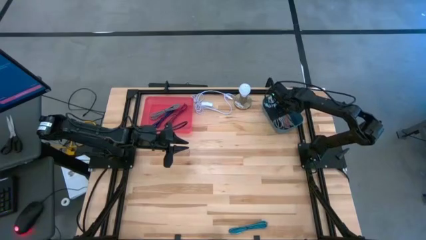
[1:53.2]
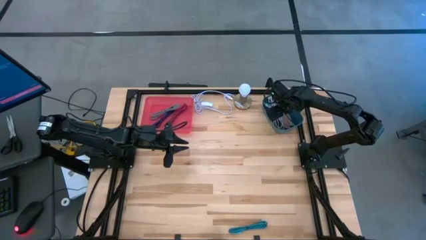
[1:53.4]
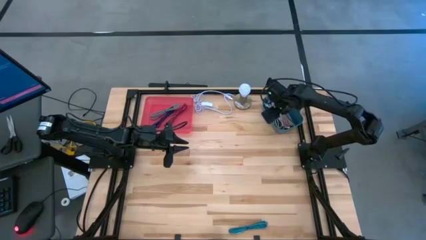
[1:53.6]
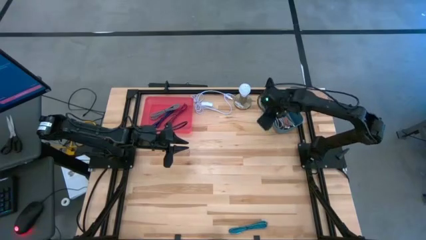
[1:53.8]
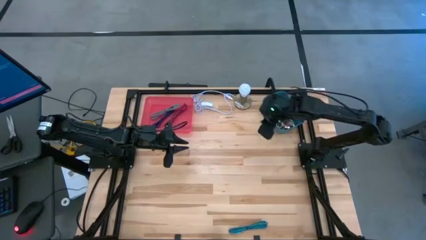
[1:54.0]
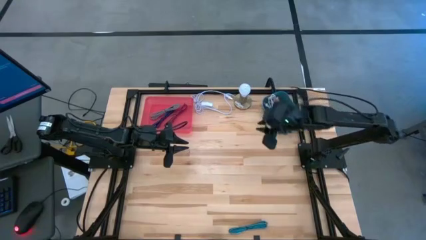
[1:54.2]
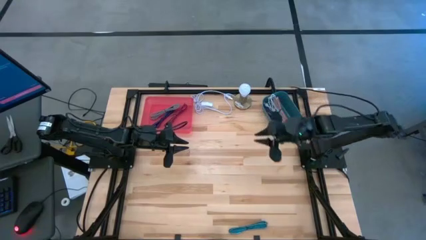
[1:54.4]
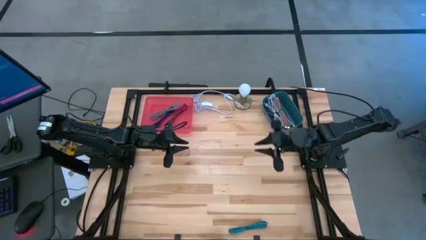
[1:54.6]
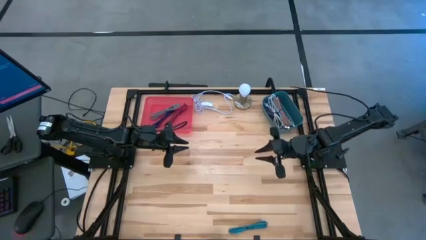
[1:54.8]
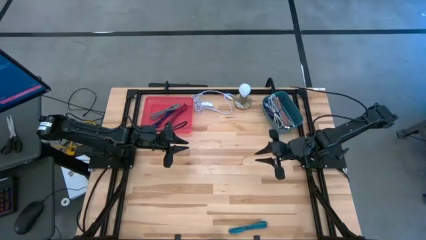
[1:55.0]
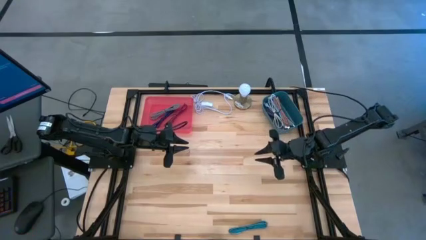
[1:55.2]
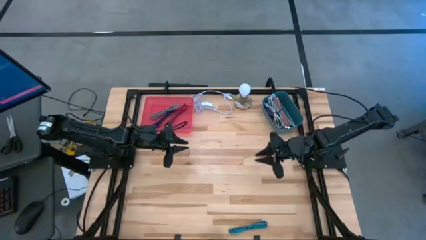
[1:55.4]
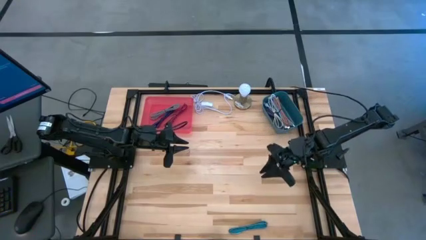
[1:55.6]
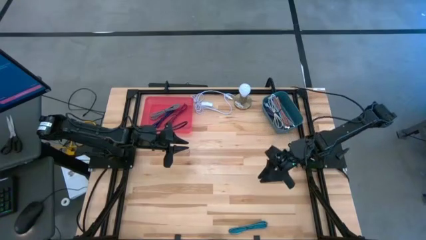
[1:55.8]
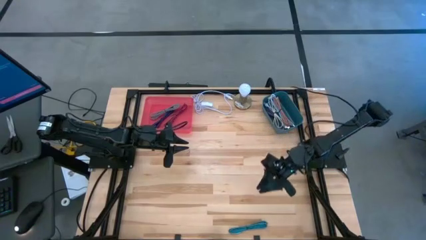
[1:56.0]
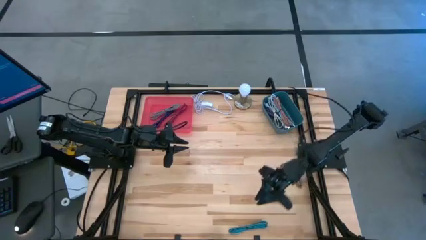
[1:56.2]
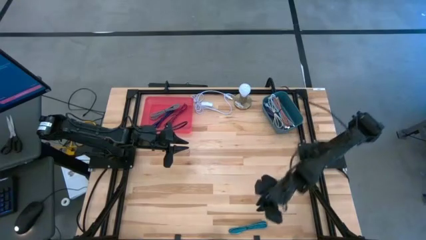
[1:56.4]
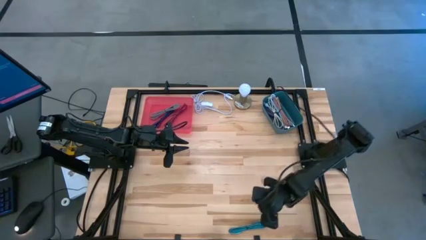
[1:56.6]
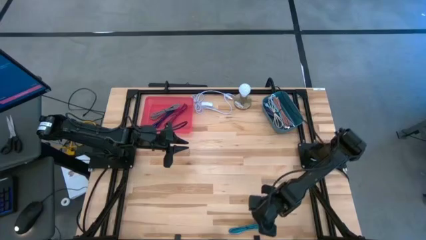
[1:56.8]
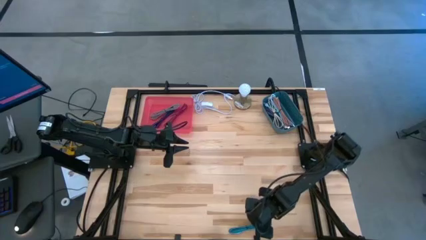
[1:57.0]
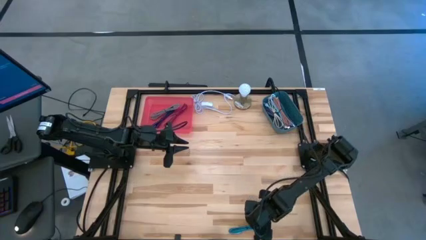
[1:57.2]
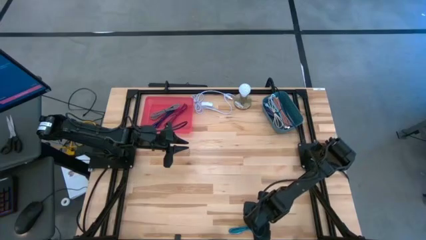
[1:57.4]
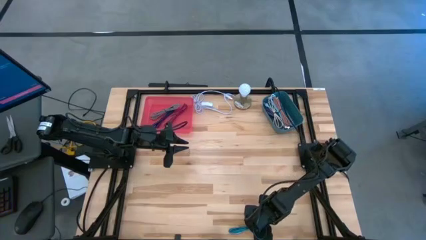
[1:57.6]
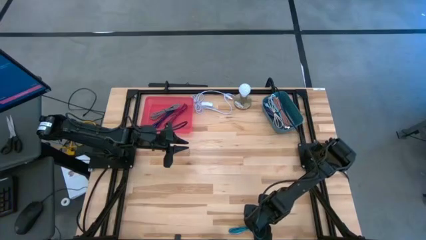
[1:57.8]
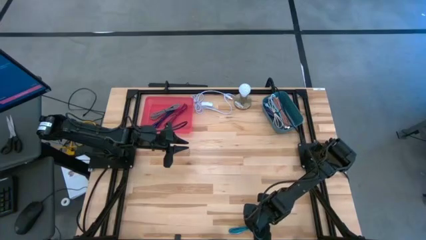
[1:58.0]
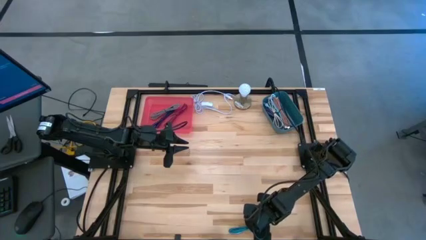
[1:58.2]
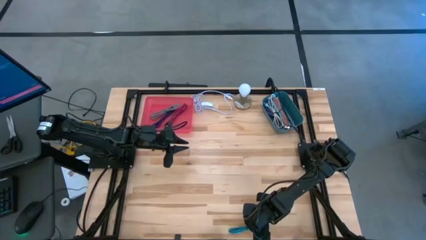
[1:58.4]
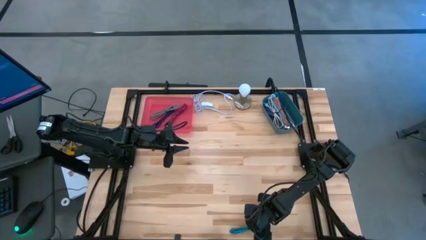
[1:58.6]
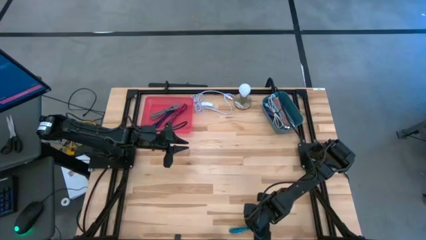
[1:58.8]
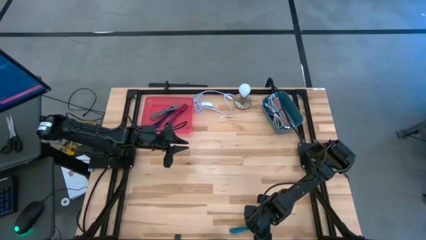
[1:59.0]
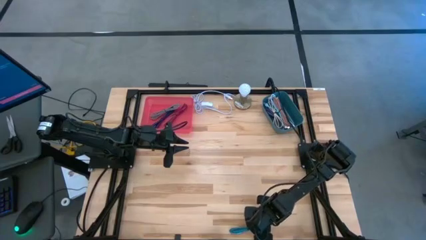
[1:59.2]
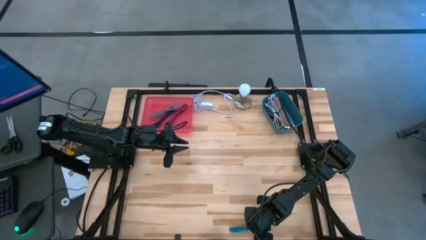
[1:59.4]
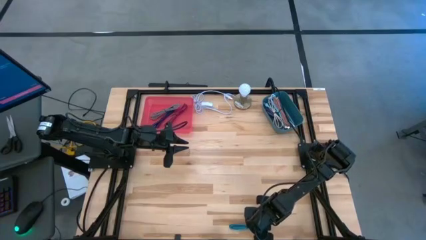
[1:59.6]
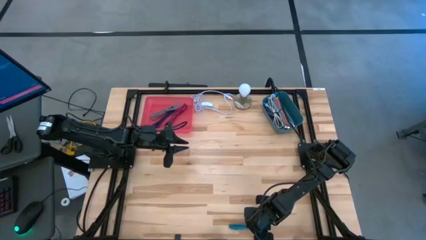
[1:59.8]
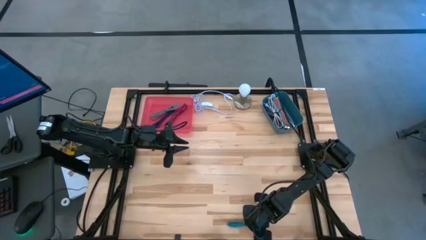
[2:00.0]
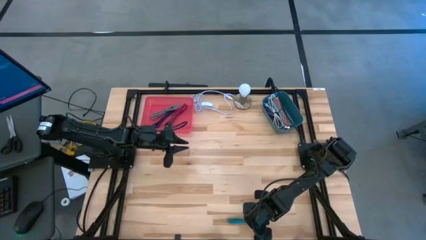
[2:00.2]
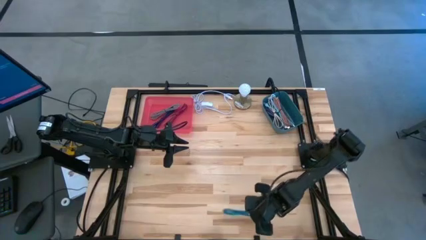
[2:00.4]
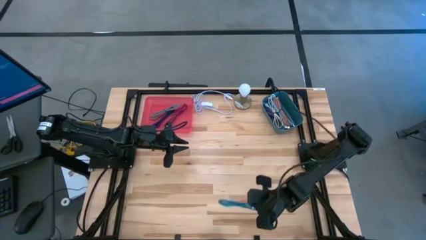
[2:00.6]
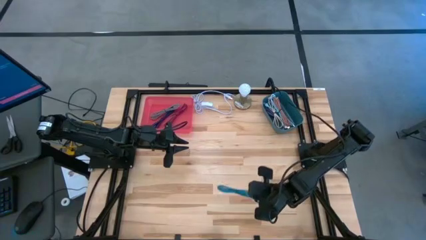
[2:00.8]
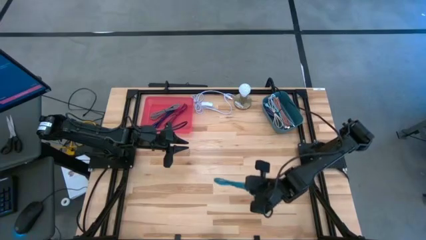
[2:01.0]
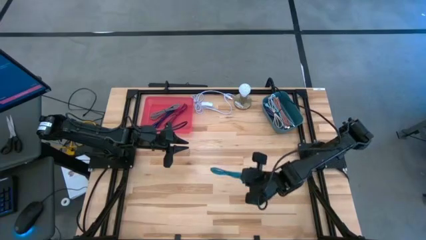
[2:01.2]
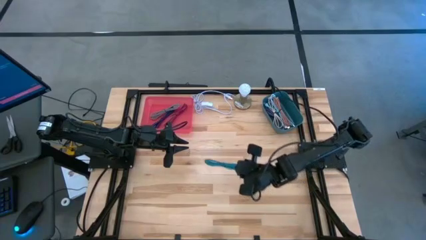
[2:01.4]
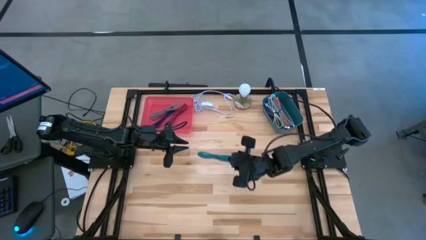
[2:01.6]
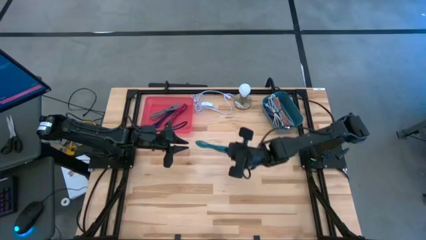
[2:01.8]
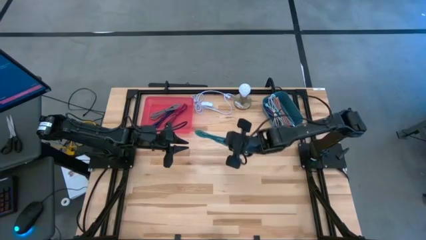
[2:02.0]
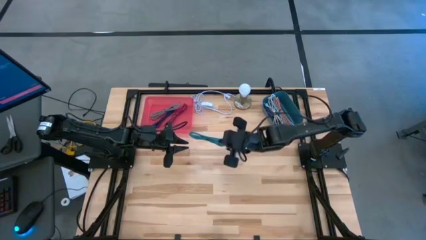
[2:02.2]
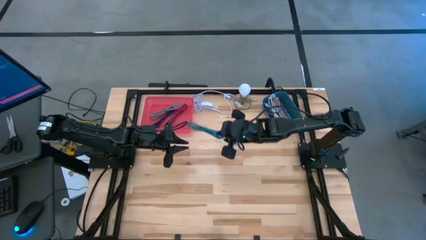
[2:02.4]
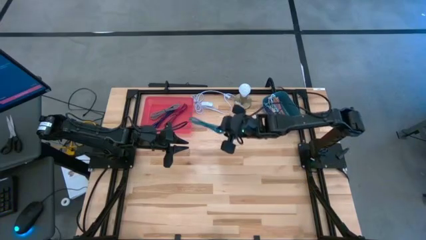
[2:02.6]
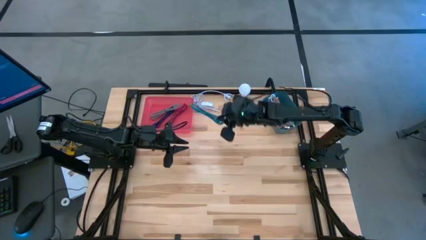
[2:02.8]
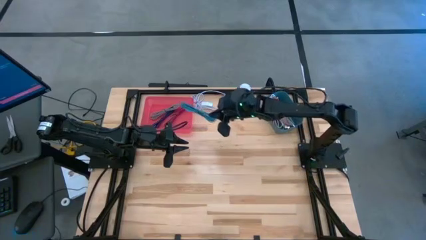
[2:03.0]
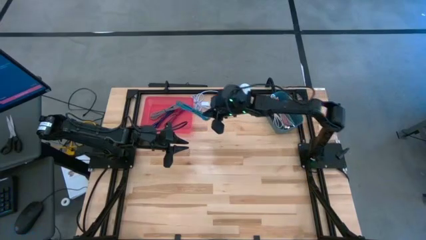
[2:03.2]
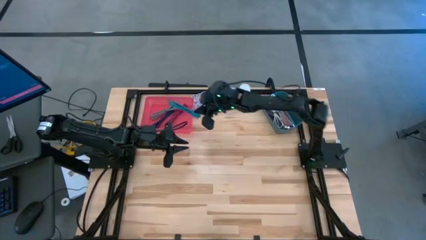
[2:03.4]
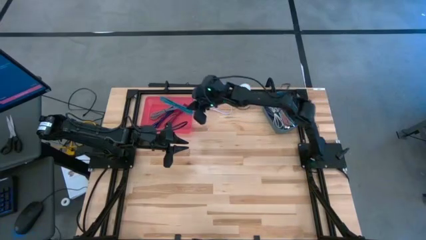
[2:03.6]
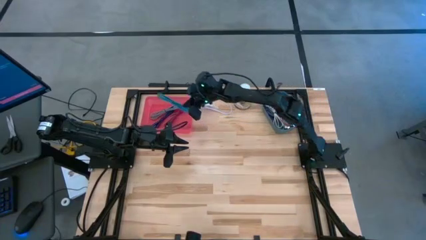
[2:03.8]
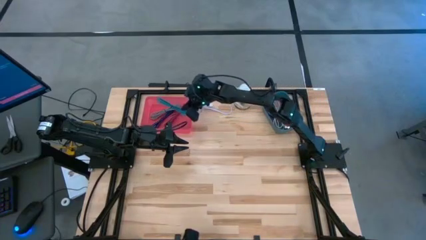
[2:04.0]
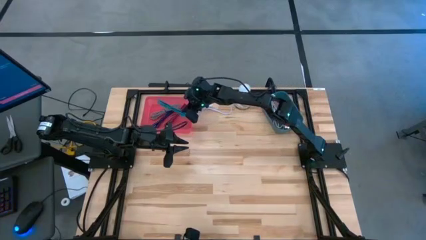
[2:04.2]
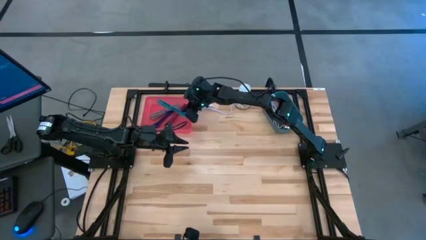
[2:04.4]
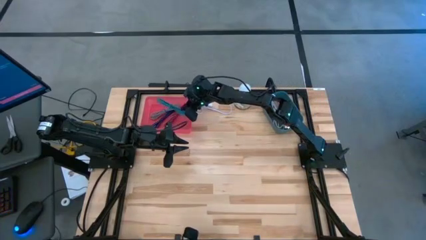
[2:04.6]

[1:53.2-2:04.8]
Task: Pick & Place USB Port
Put the black and blue charger cable into the pink bin

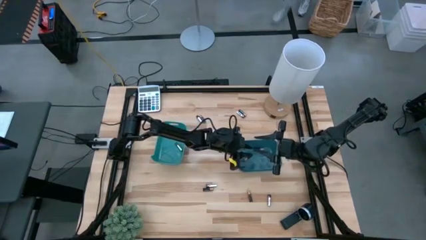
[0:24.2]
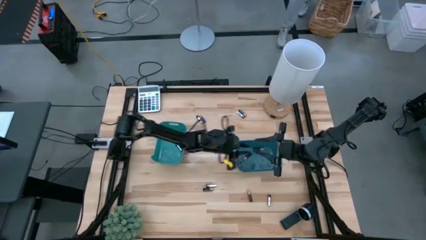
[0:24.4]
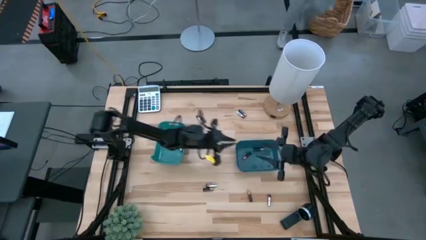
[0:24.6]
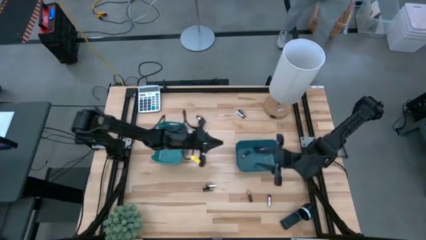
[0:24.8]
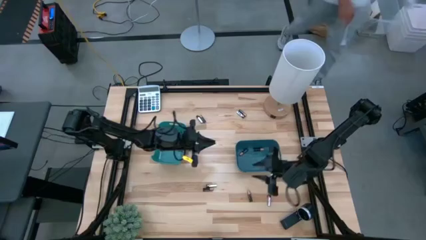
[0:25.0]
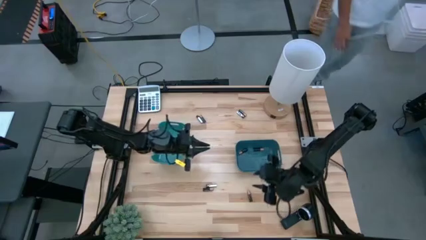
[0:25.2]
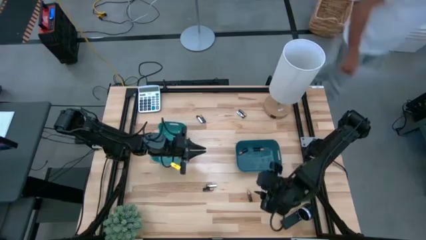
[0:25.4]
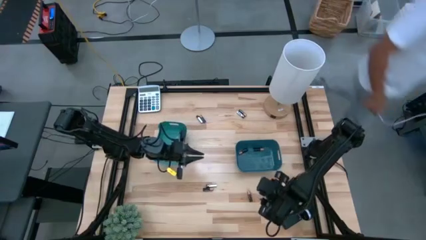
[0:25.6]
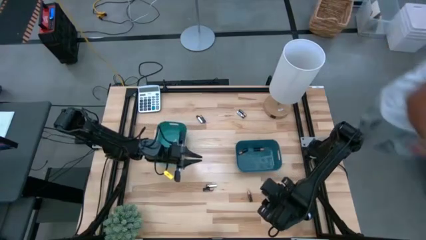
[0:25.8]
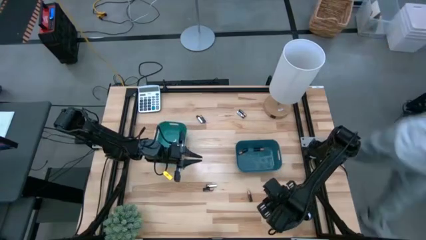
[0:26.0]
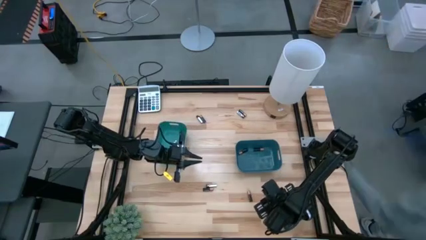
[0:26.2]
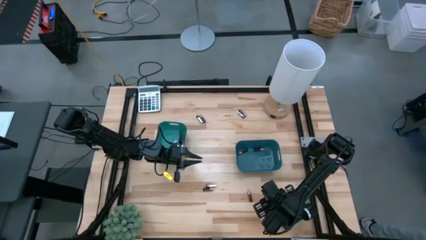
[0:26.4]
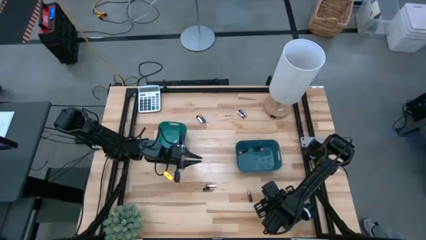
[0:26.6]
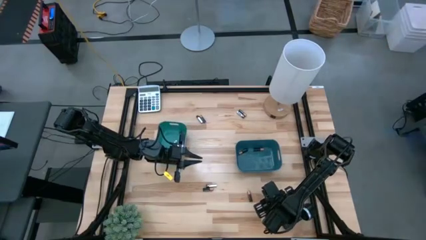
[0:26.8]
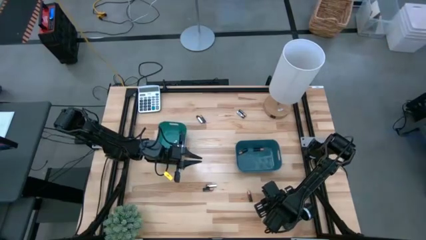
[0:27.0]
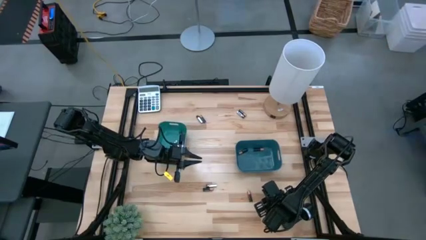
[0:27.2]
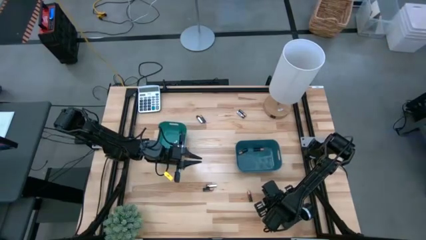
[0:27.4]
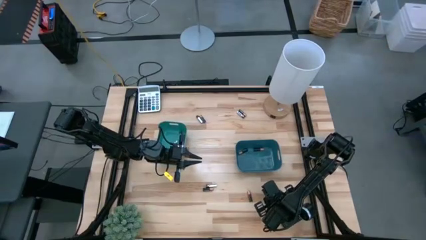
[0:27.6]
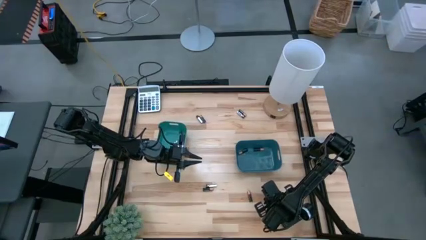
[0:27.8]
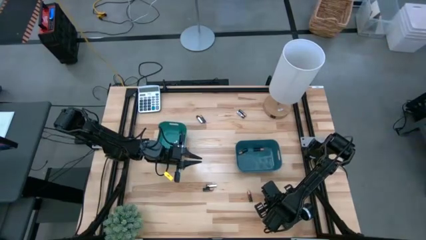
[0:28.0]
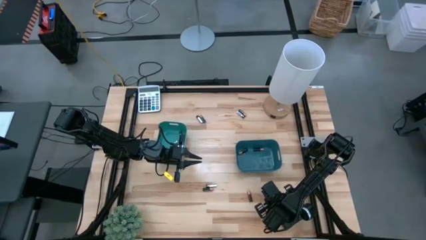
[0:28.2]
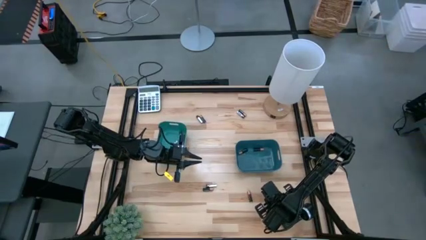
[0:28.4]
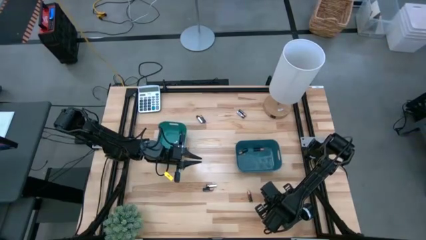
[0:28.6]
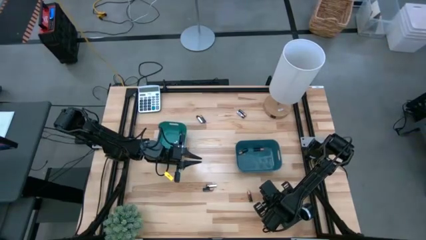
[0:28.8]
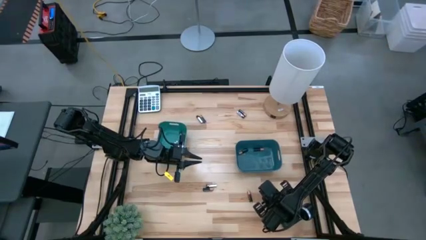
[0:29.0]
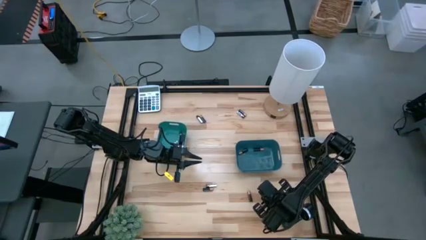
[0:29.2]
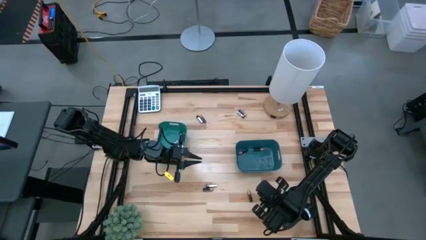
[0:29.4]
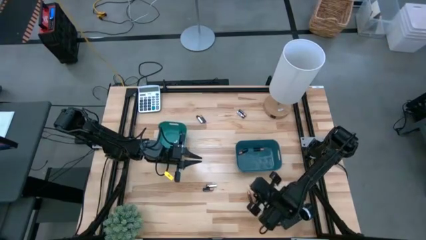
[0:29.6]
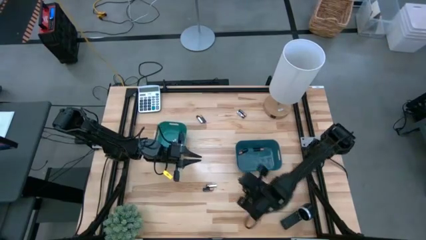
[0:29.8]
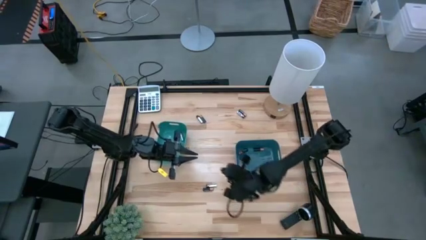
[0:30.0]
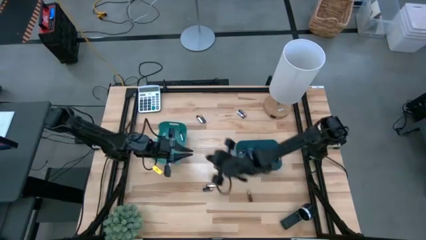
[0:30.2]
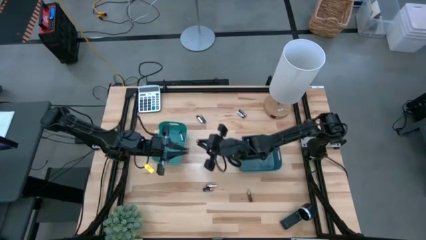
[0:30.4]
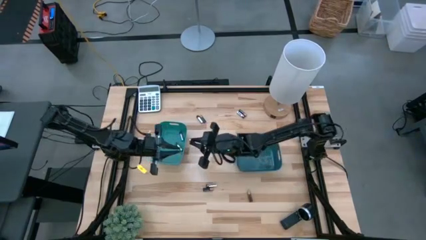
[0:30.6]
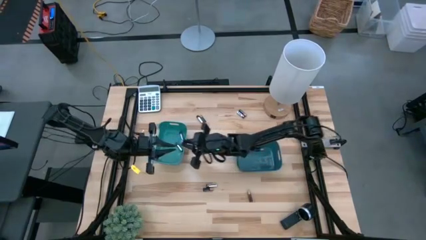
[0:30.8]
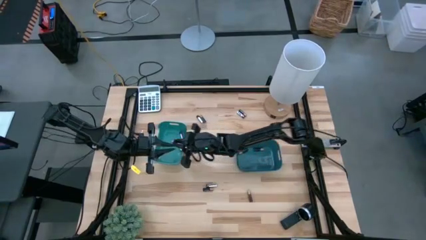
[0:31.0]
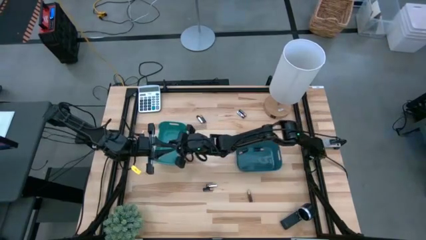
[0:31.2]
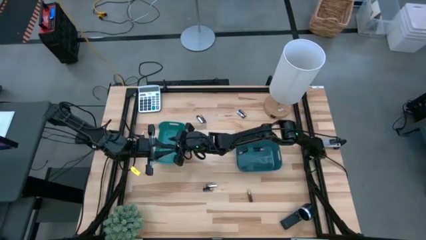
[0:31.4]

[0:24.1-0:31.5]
Task: Sort batteries
Put the silver battery into the green bin
